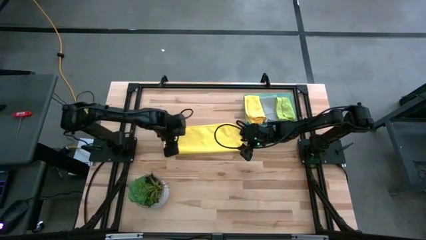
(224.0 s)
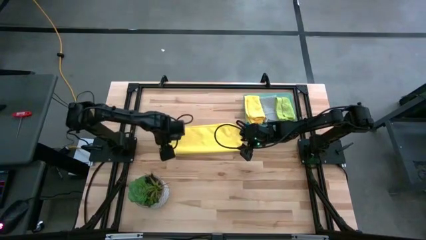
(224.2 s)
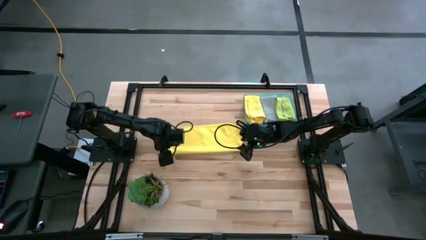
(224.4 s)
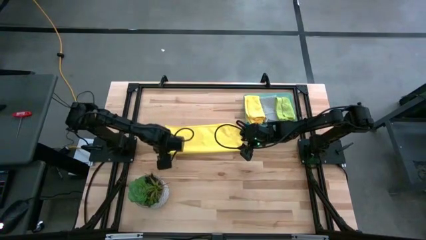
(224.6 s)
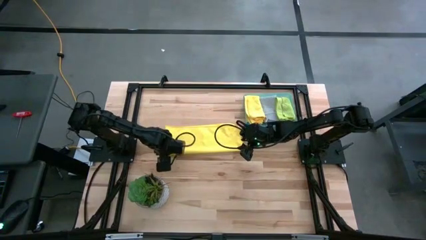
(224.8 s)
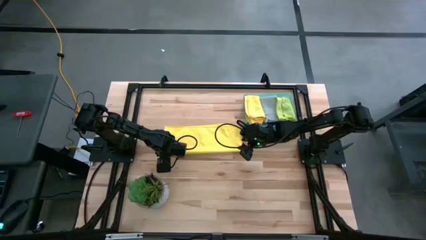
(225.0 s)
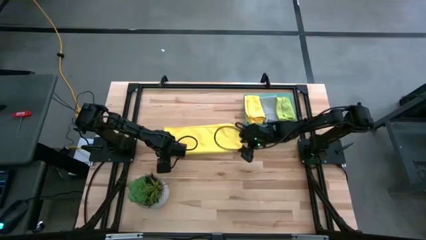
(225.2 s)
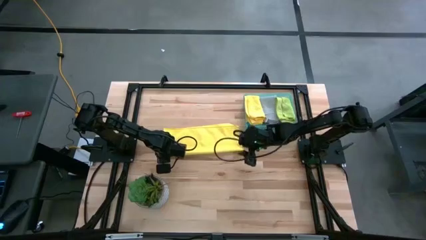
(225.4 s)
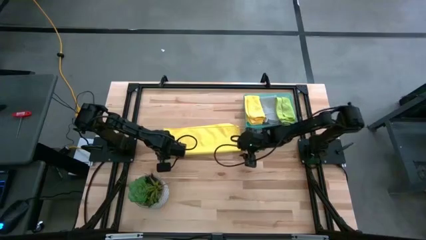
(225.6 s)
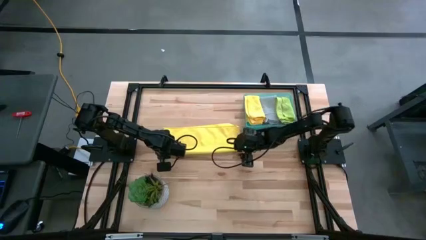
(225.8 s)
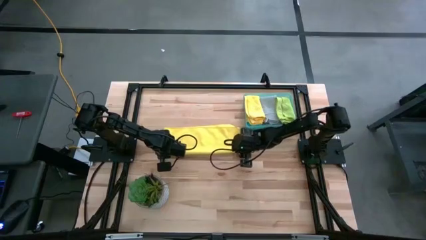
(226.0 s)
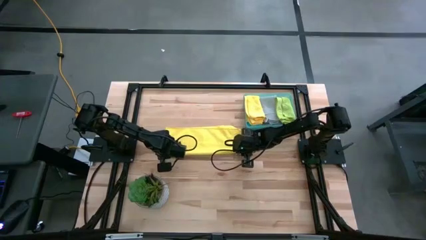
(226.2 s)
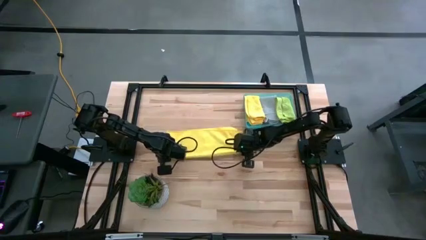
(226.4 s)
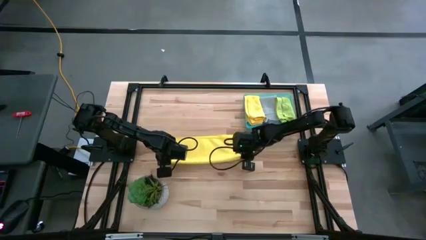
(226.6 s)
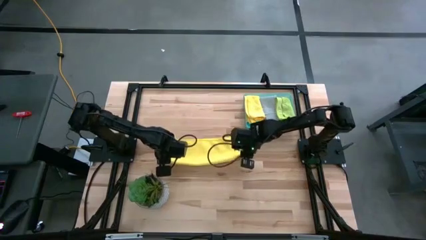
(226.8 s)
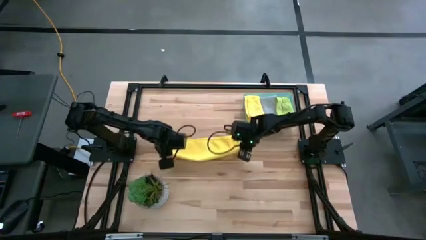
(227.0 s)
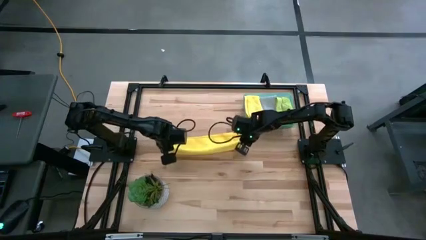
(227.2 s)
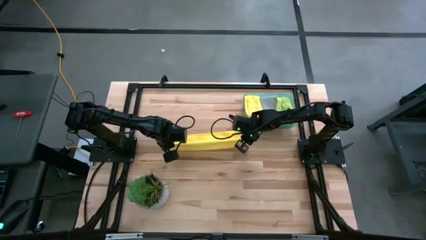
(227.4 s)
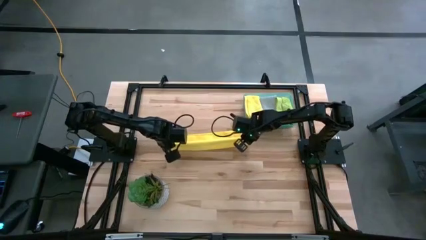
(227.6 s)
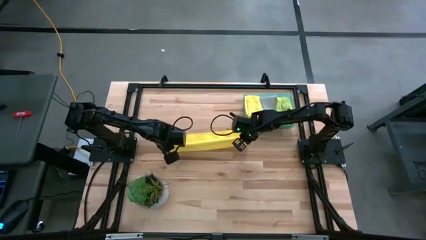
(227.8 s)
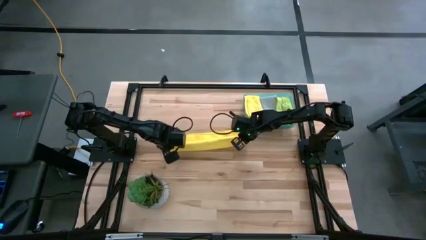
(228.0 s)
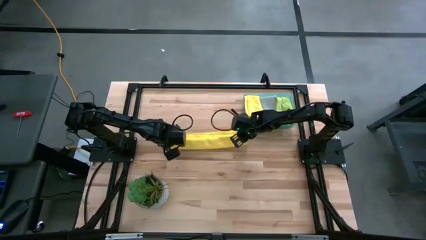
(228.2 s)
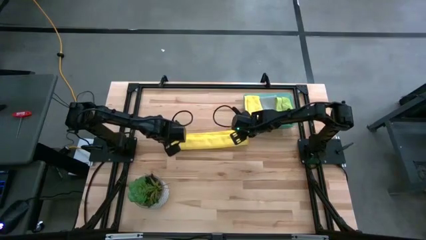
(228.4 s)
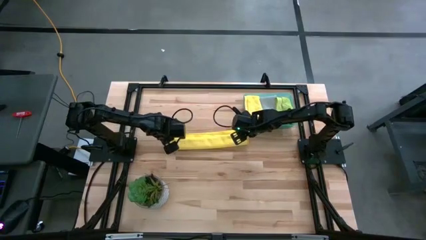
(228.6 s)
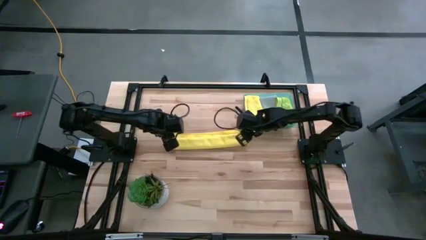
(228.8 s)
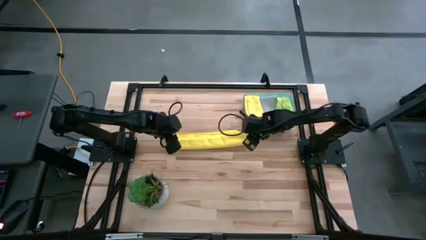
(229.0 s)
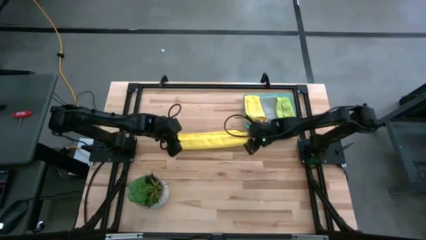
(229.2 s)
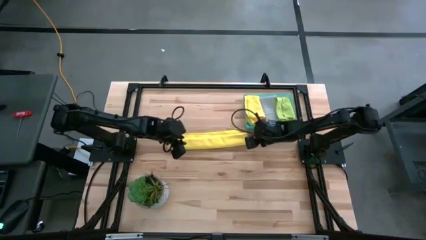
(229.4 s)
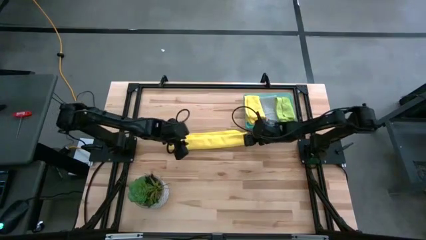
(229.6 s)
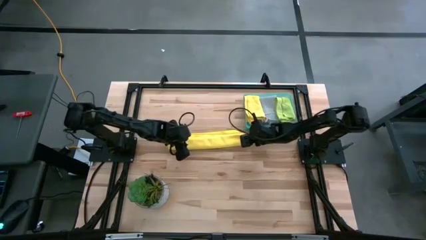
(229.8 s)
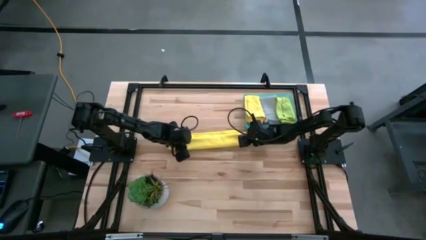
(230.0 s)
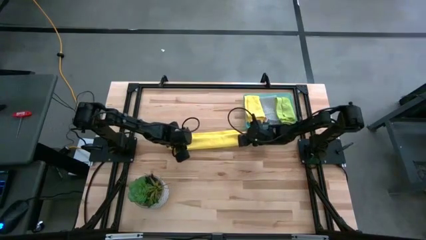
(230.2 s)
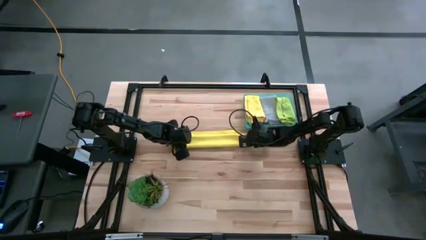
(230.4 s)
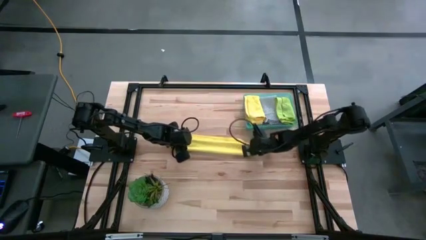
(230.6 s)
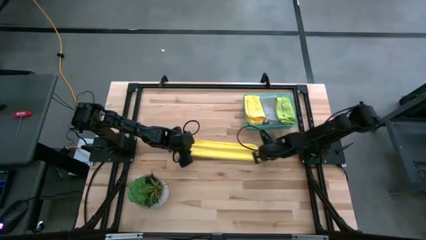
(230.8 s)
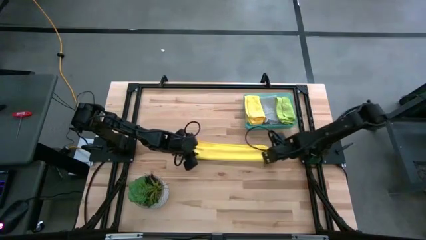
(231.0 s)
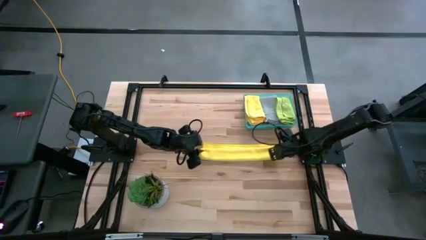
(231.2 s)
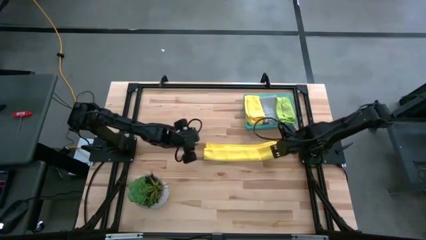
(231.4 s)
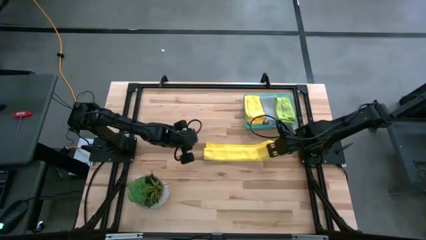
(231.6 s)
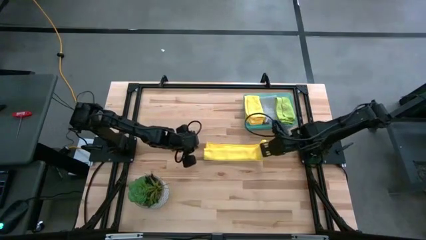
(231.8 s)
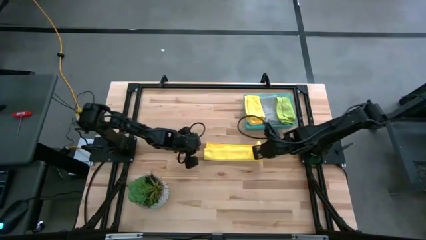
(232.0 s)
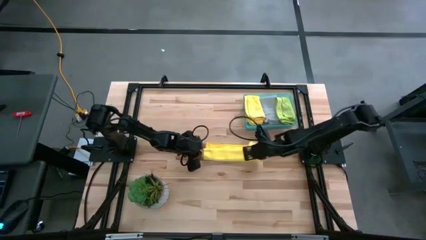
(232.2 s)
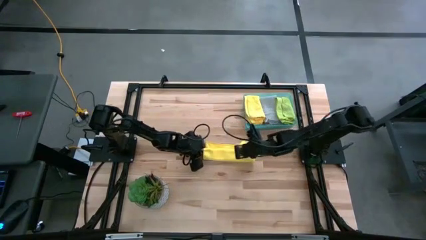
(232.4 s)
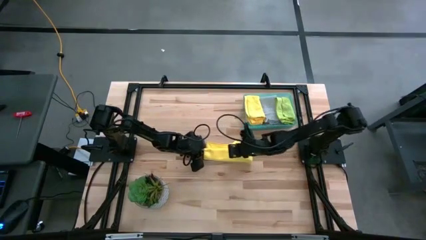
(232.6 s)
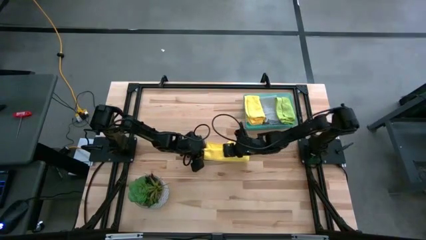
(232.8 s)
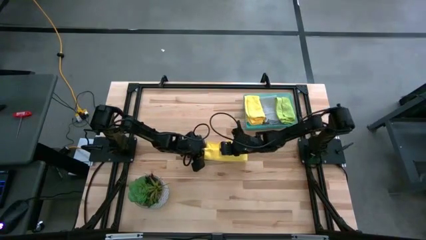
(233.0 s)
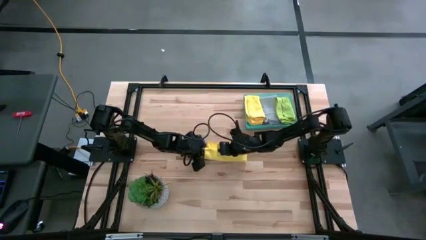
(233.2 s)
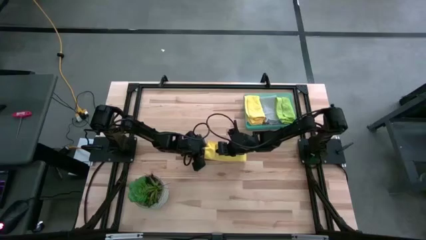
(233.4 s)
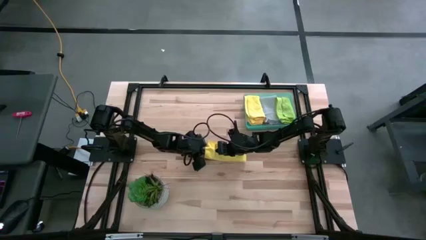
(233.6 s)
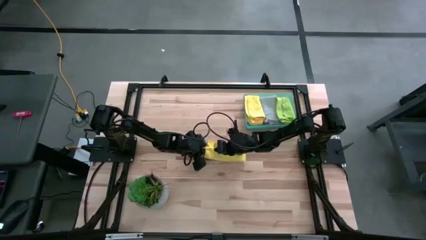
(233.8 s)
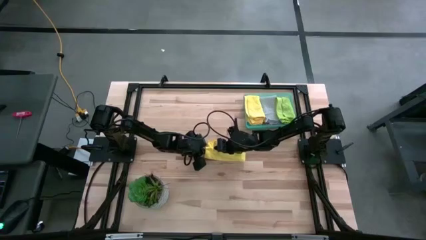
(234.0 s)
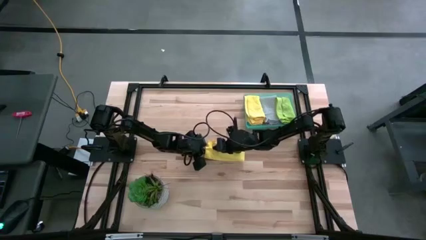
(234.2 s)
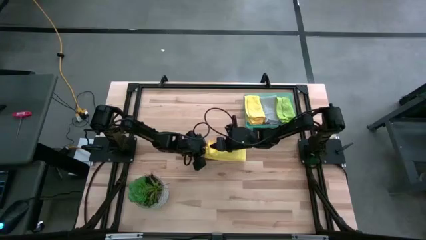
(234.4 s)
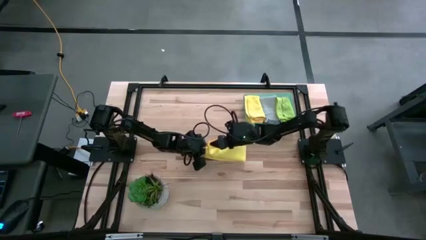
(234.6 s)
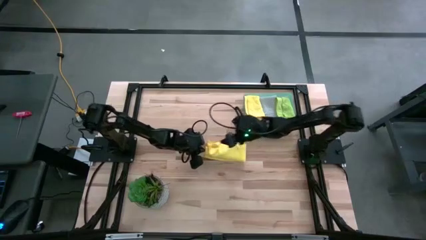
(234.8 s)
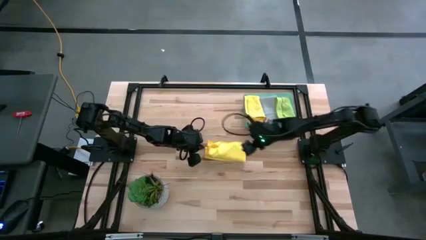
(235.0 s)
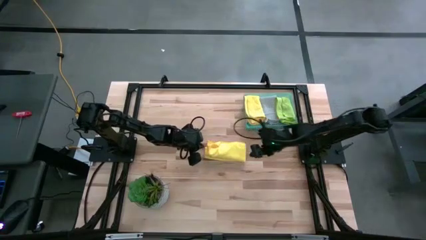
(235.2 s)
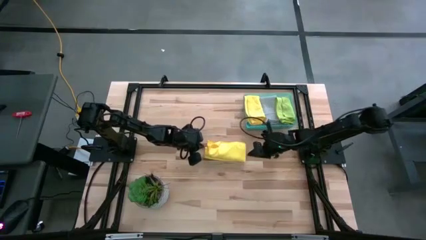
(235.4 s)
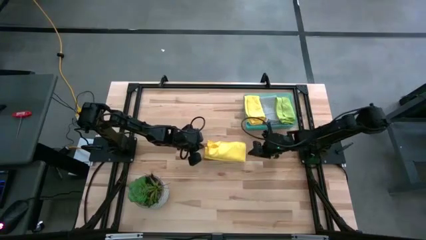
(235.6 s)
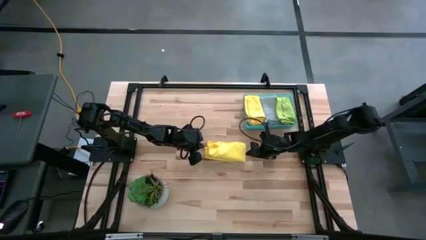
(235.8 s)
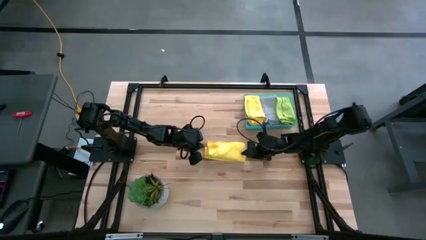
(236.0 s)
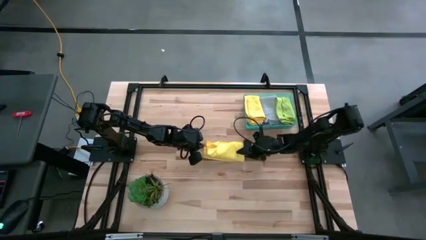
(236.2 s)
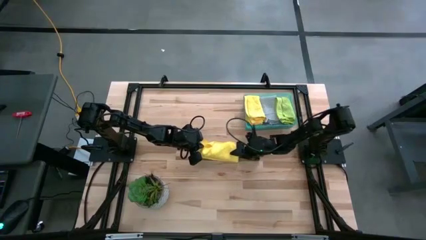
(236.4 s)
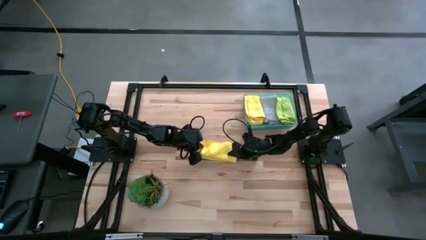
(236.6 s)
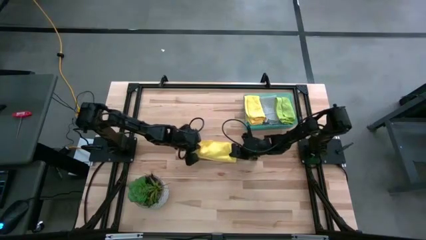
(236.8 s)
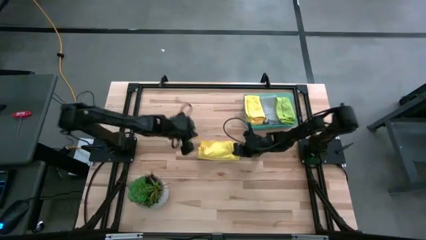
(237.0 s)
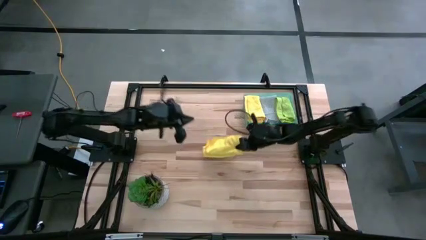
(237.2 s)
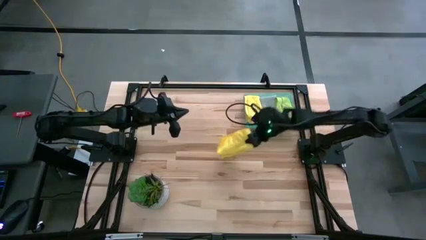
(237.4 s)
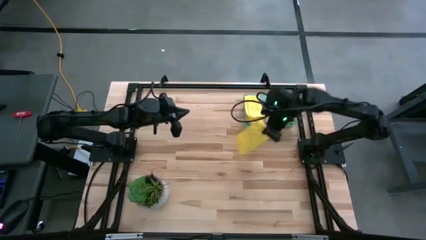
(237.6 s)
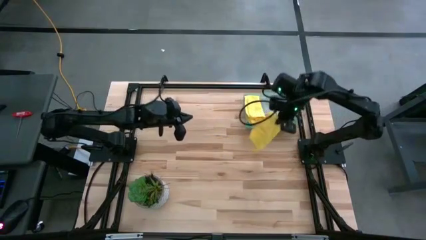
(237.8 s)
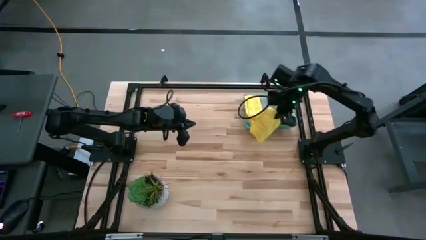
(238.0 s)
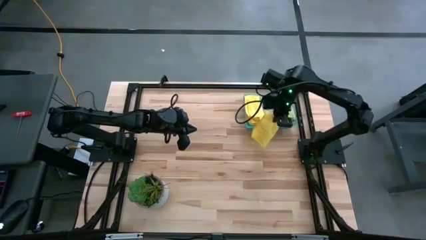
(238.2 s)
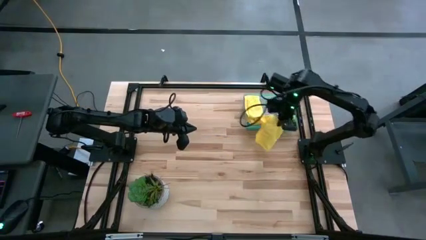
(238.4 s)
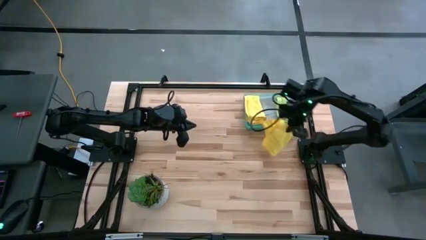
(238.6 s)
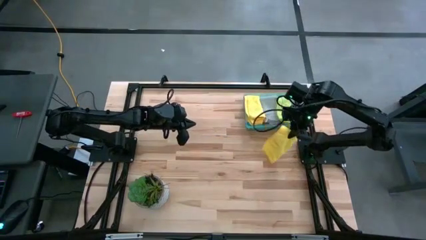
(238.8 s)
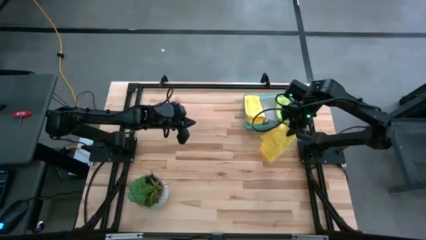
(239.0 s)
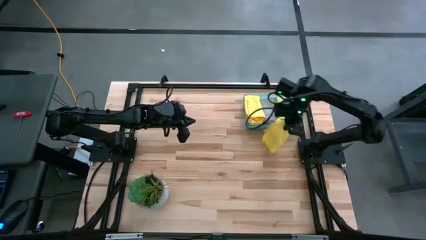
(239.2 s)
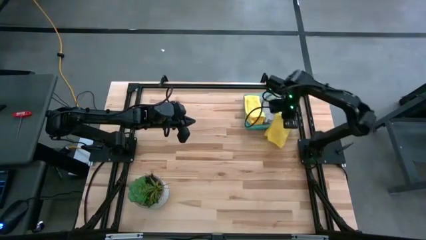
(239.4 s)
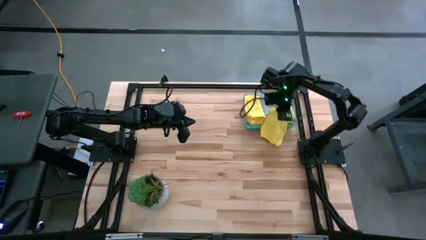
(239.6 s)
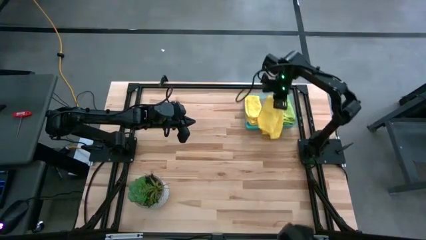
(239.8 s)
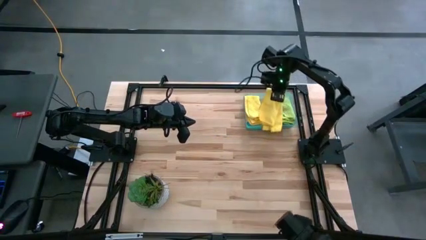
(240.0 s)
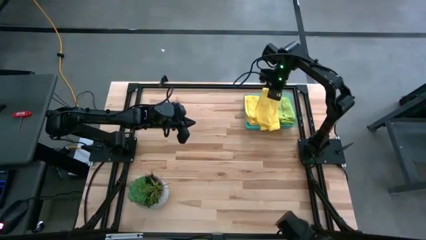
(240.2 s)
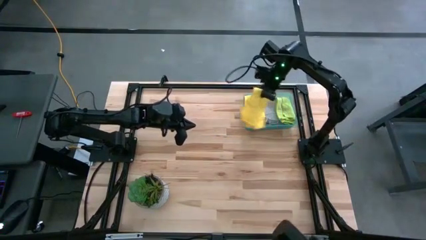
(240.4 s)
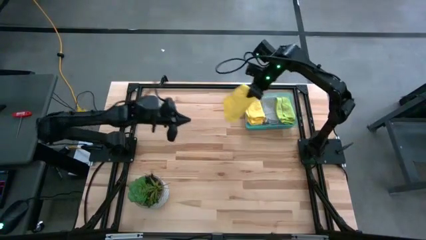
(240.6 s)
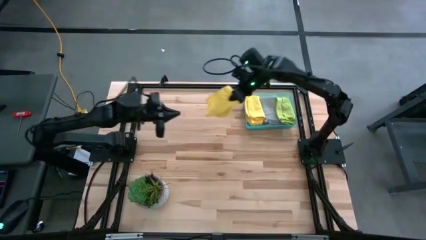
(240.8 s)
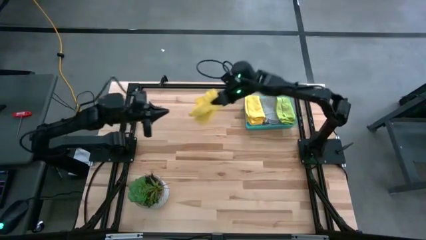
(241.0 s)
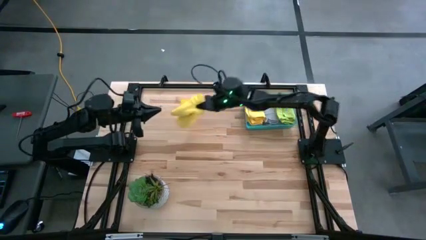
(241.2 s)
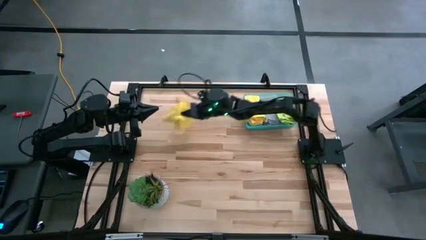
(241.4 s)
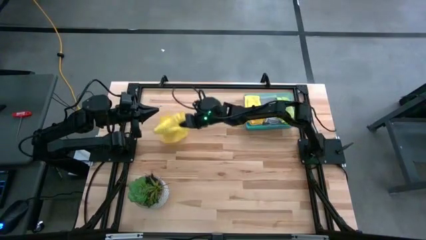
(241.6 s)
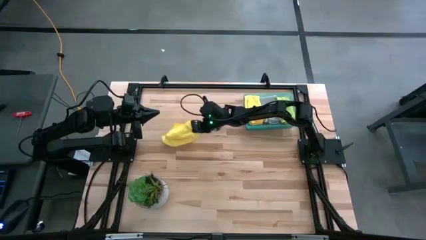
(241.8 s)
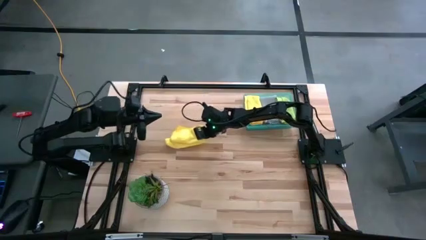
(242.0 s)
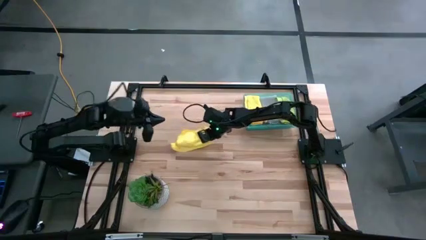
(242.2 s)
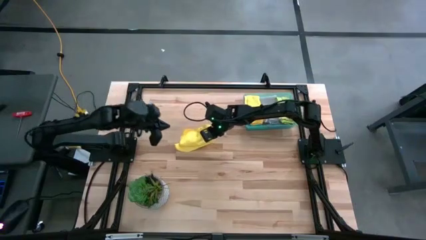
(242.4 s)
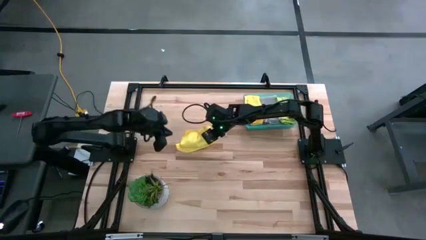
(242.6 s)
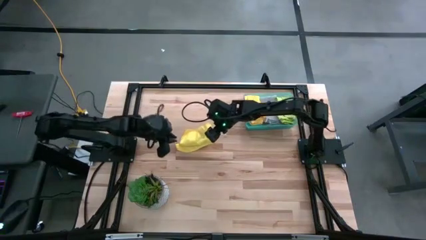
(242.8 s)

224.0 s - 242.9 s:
Task: Fold microfiber towels
Fold the yellow towel
